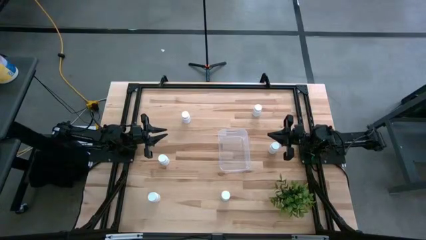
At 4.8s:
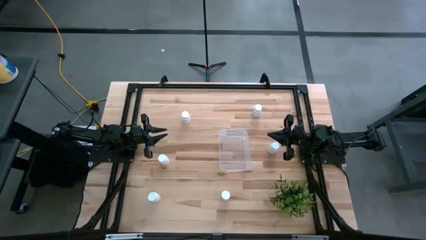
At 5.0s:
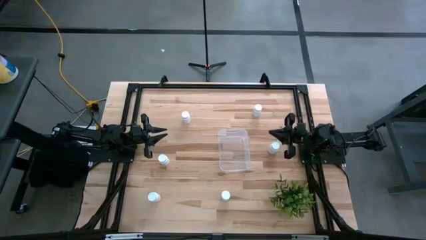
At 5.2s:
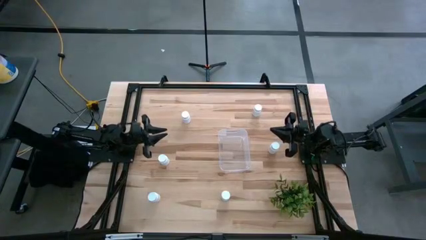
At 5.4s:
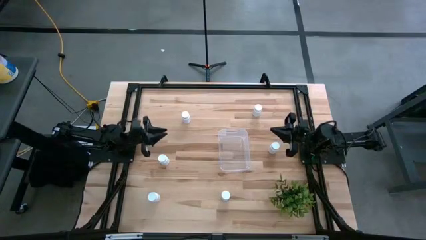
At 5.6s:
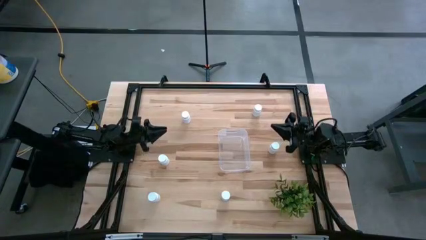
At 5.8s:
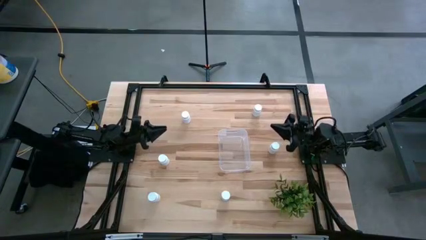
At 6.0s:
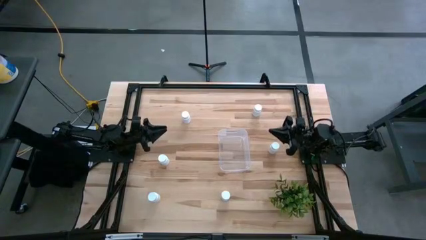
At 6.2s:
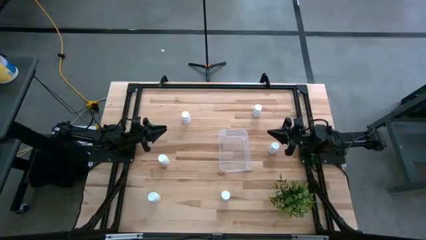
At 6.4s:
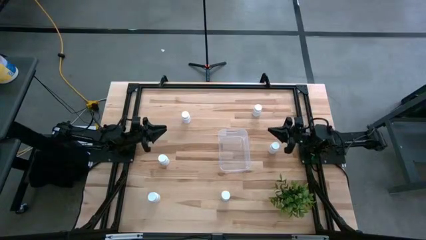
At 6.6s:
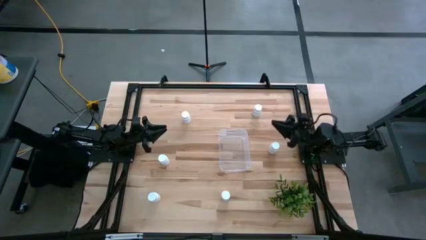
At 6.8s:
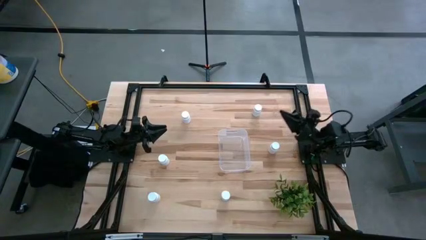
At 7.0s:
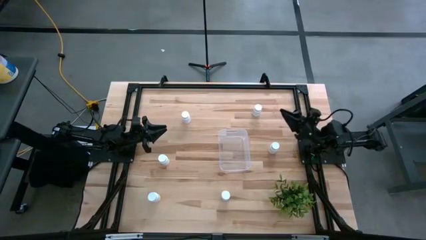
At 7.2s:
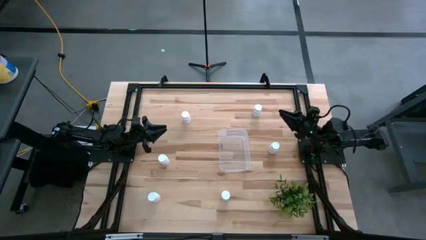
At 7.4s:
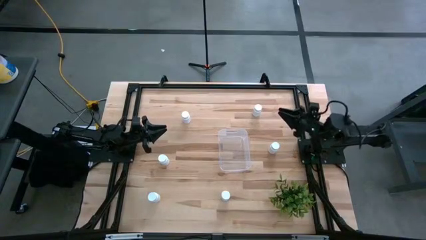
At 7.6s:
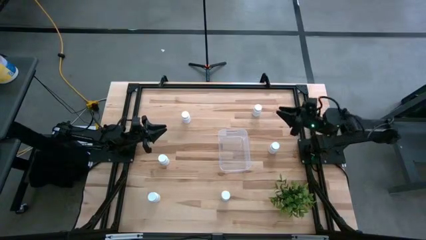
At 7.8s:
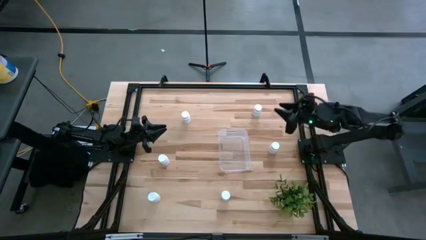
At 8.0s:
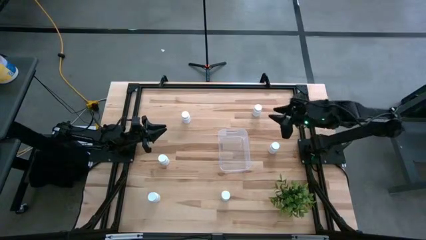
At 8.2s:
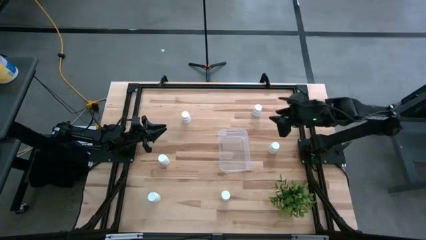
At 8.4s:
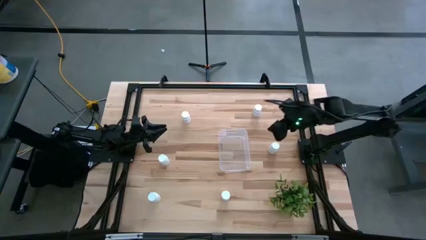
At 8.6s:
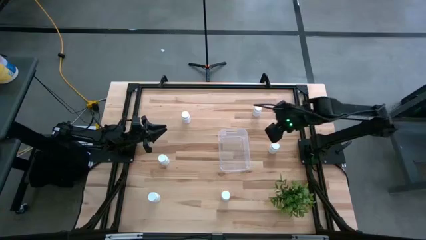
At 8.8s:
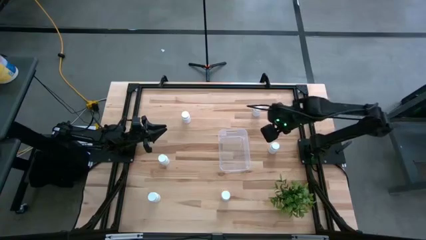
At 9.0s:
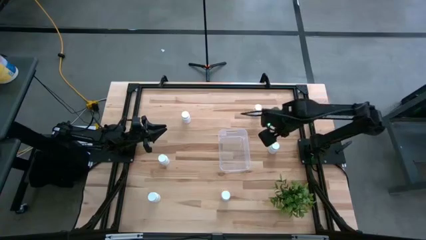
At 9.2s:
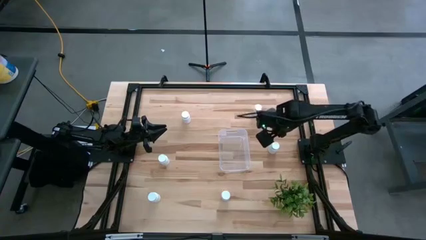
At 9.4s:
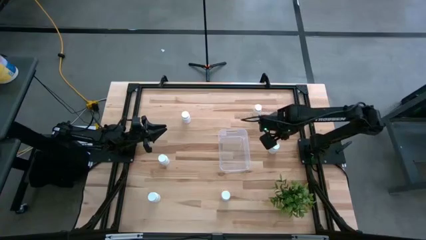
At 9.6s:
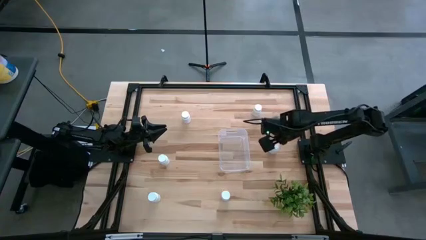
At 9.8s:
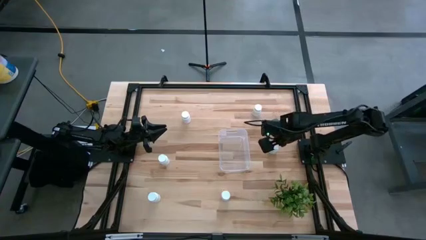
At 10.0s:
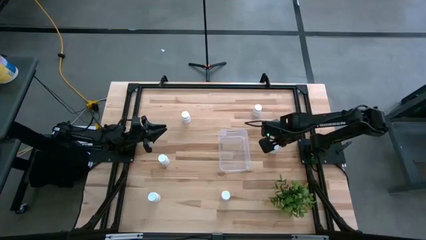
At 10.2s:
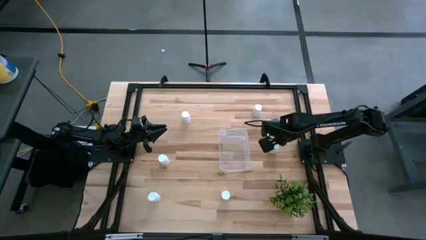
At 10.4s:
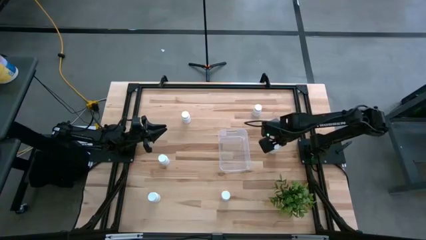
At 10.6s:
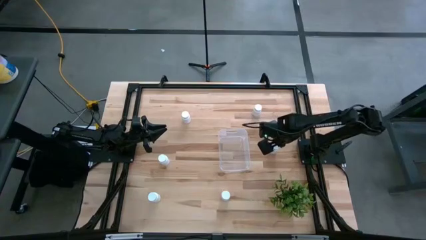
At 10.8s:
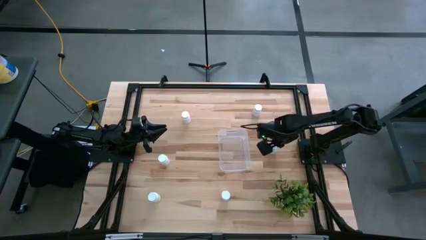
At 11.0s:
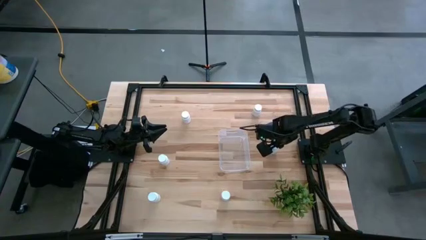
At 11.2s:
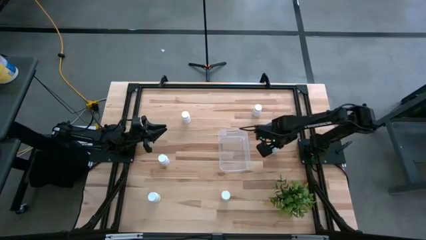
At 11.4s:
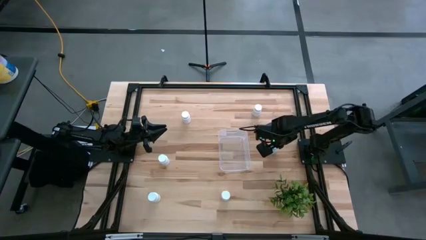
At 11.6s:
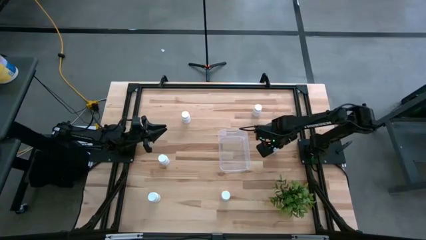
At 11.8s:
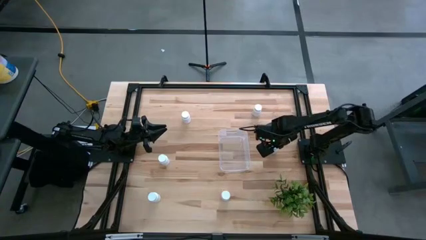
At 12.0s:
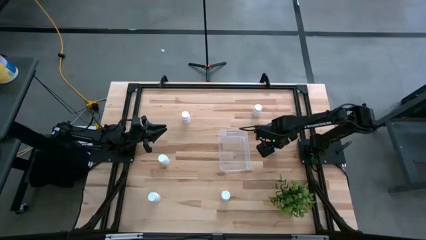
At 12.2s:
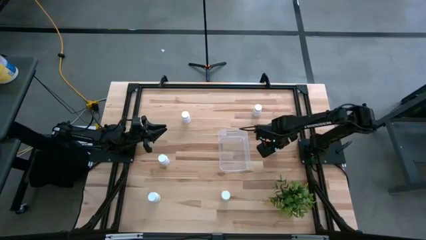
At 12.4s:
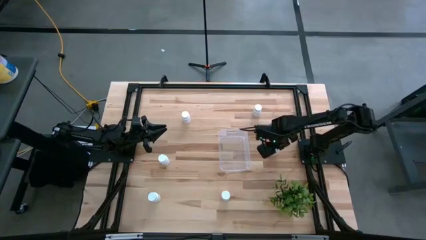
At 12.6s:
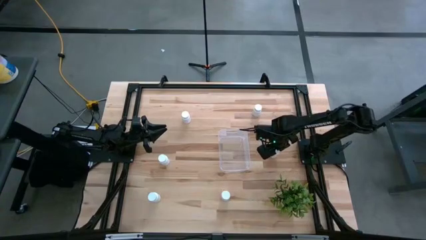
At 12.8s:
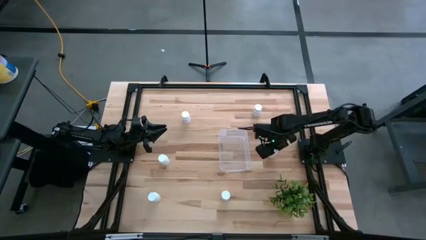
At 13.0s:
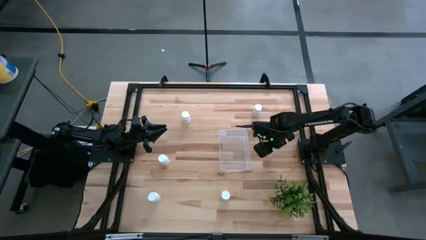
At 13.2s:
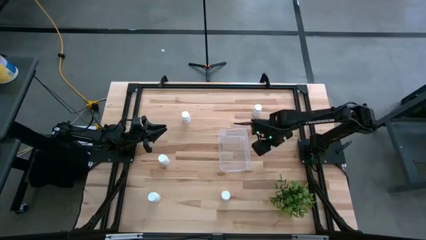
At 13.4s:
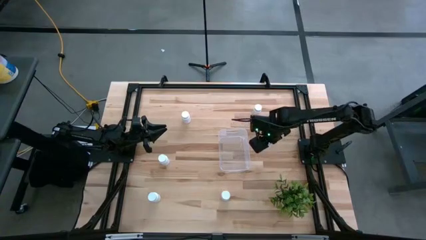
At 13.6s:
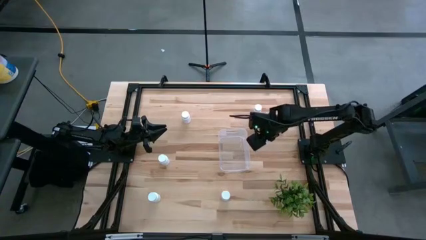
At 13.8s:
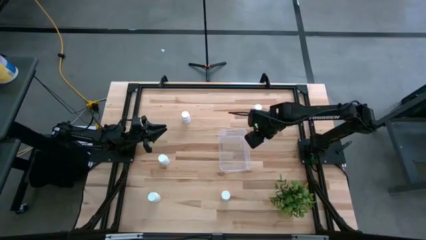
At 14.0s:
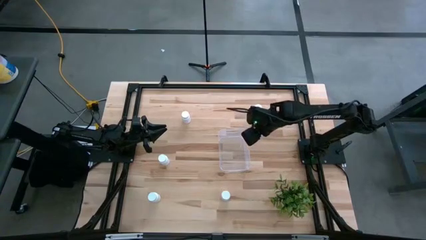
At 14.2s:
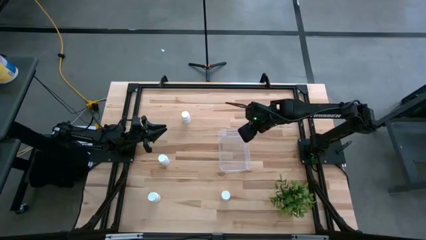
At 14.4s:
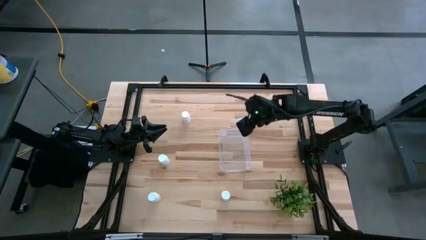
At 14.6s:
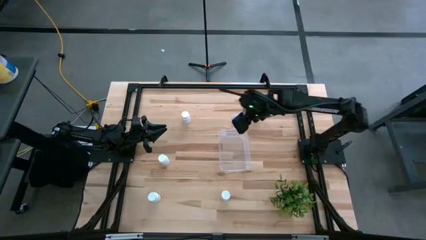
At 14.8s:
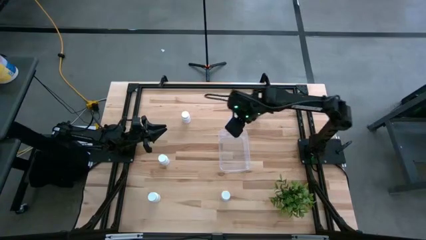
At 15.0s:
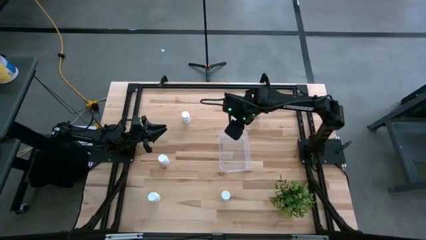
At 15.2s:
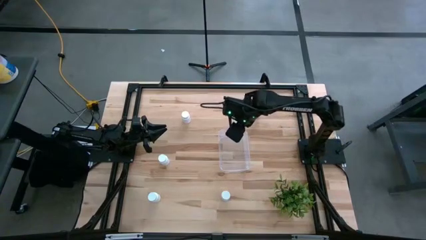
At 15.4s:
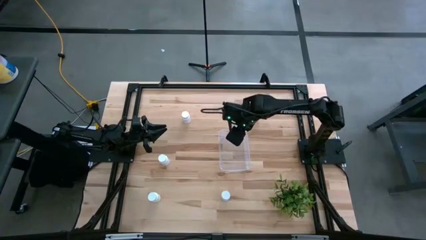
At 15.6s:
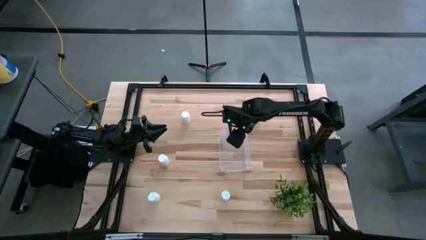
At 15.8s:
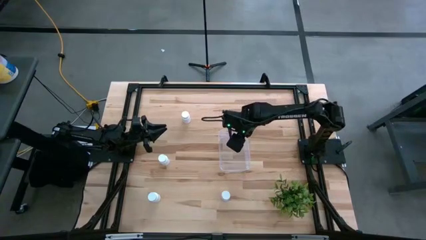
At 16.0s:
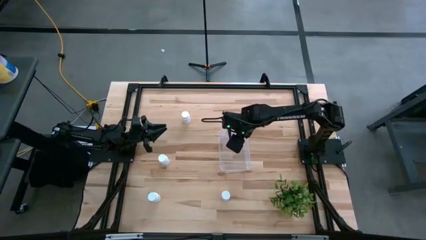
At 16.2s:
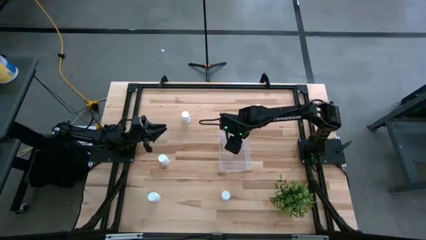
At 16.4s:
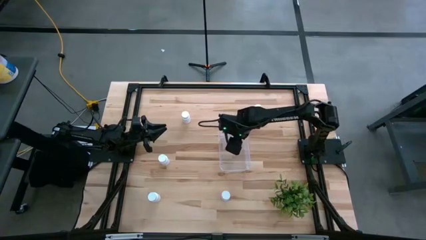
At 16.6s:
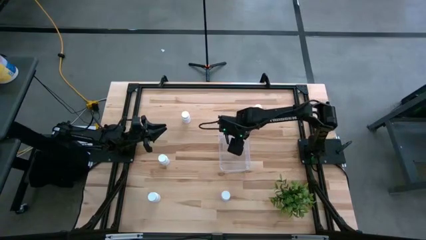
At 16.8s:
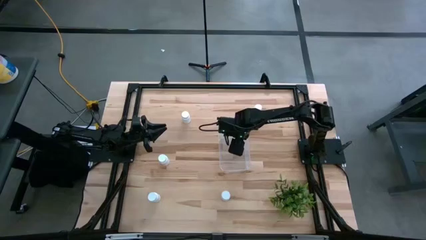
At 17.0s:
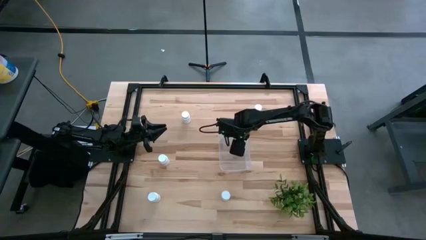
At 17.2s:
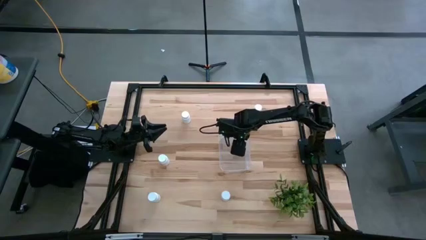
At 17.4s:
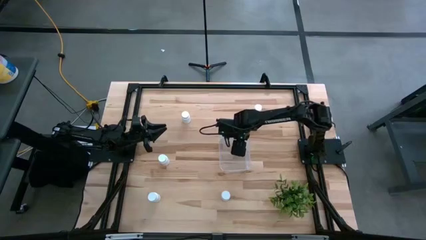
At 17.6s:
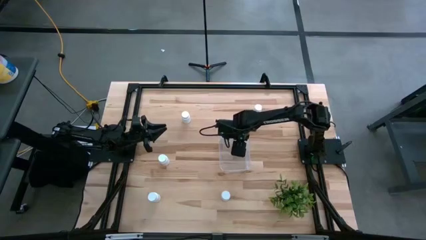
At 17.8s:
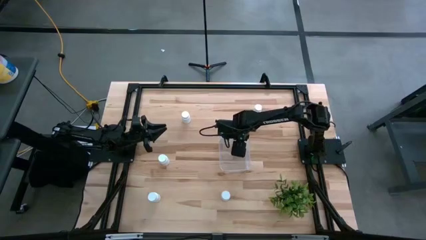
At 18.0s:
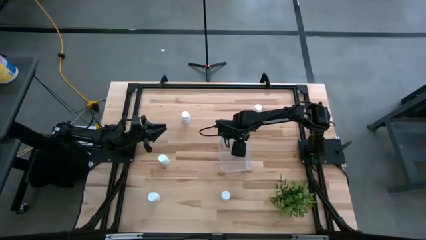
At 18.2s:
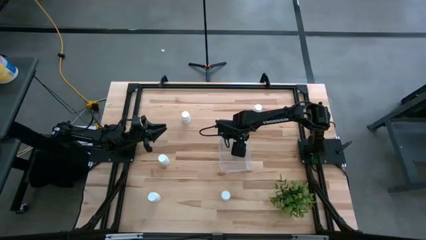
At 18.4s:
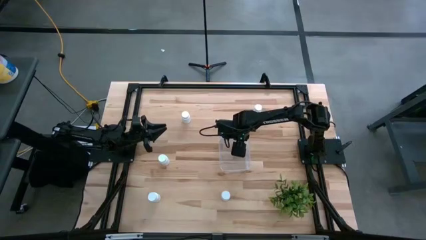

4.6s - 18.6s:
Task: Pick and place pill bottles into a basket
Put the pill bottle into the bin

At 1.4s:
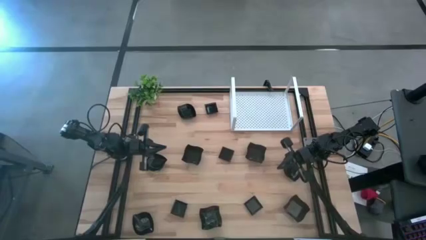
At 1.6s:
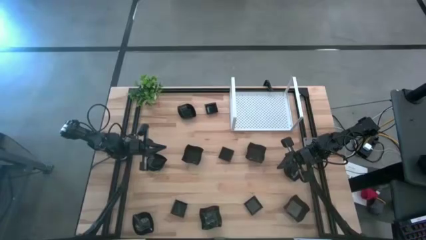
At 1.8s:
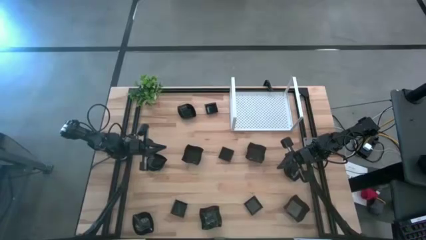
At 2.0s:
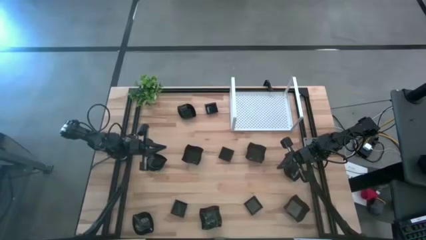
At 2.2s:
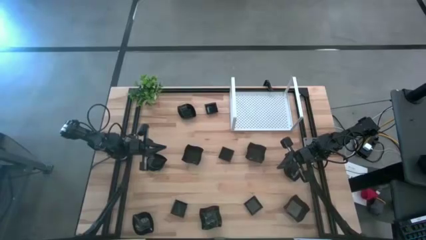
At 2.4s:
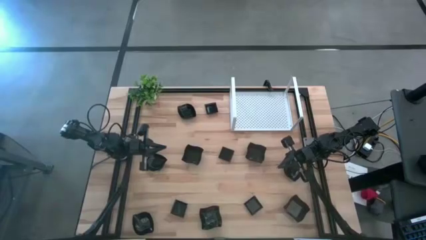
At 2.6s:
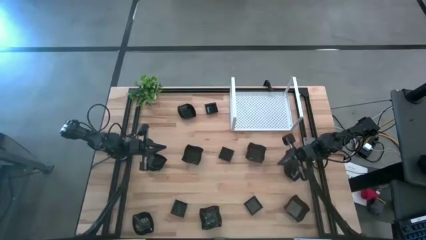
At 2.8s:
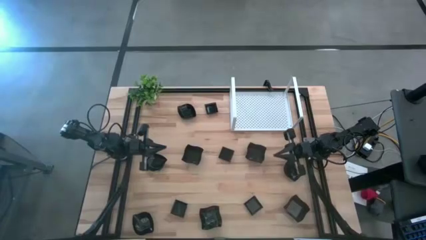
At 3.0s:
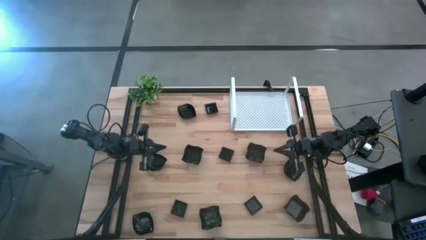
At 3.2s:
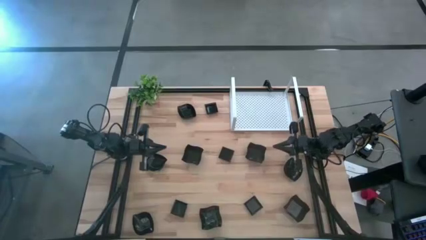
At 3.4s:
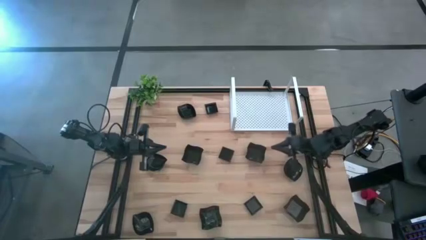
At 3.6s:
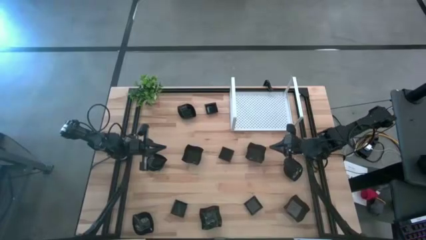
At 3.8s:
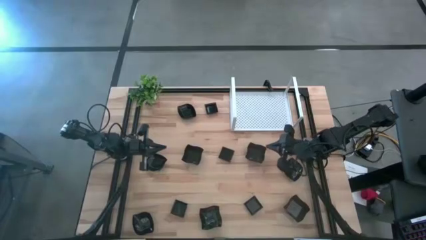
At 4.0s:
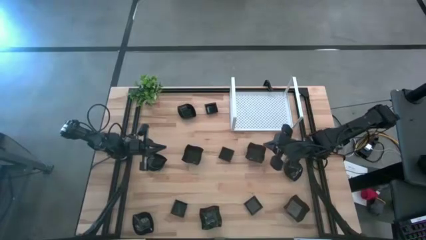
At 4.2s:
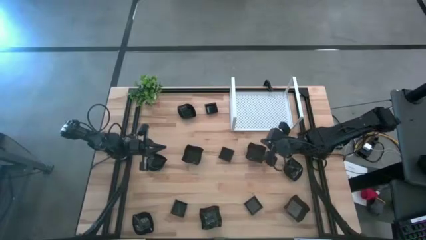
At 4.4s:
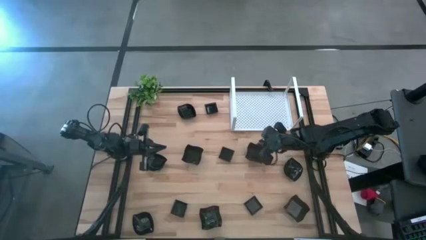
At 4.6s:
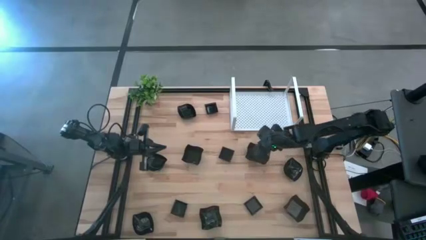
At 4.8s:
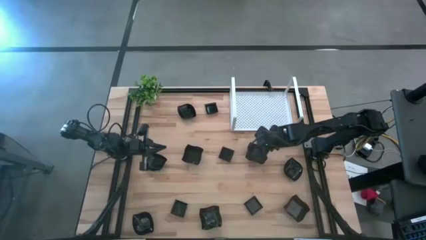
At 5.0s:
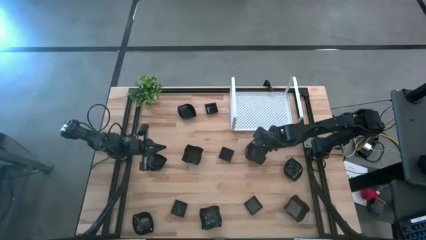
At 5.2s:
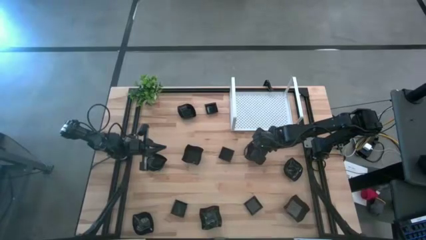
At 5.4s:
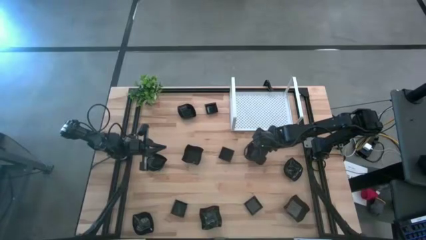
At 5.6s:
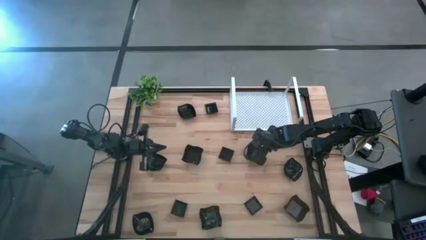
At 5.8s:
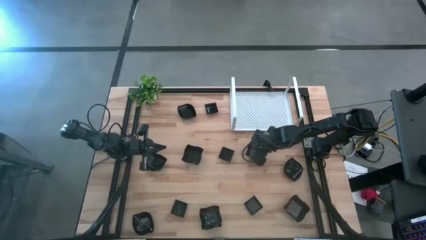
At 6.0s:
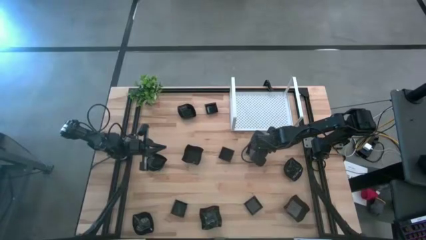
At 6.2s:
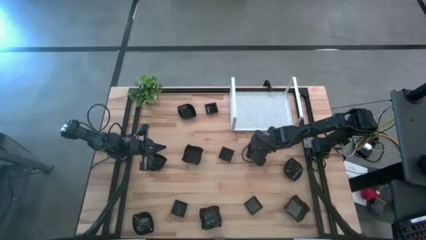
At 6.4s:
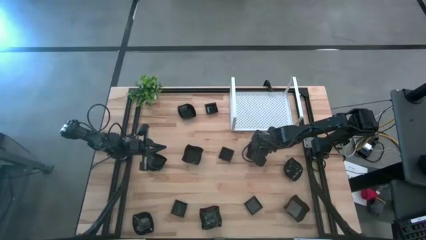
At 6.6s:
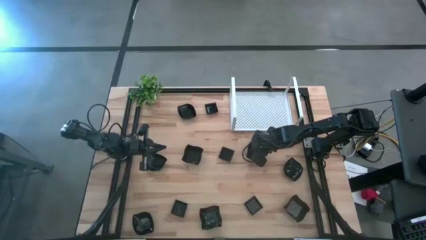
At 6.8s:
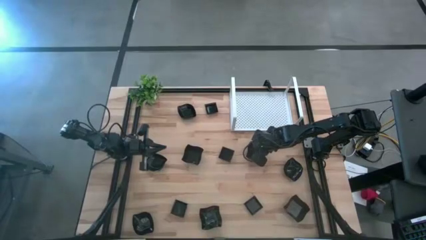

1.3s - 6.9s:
Task: Pick & Place Mini shaped plates
Put the distorted square plate on the shelf
